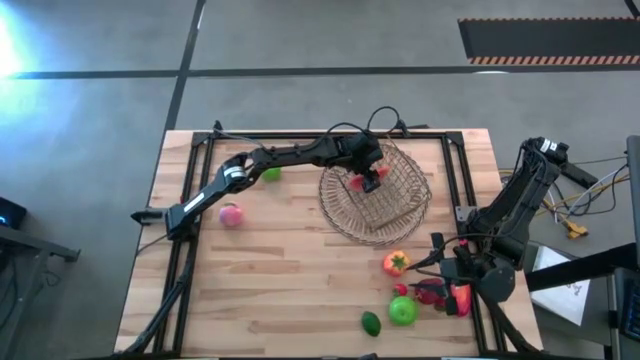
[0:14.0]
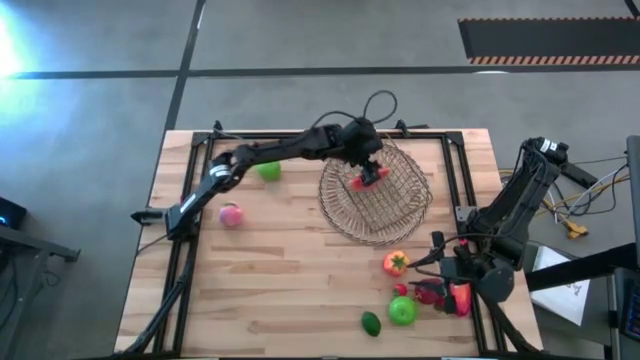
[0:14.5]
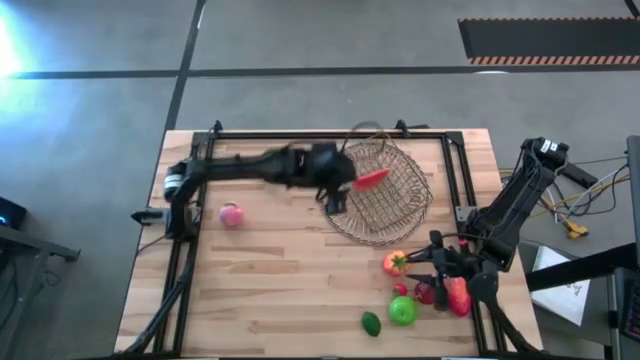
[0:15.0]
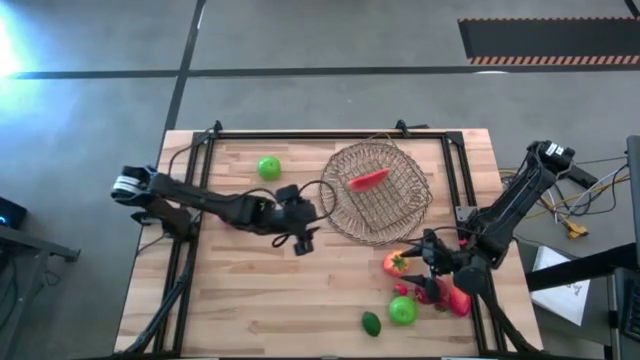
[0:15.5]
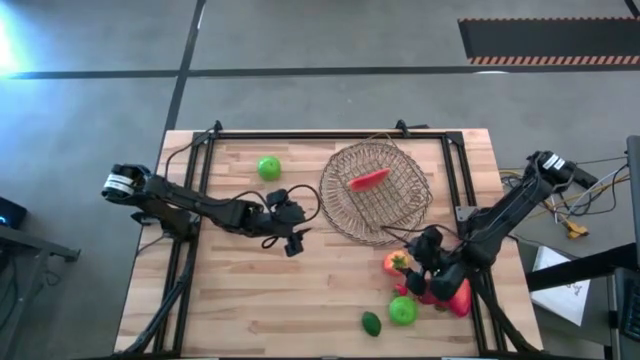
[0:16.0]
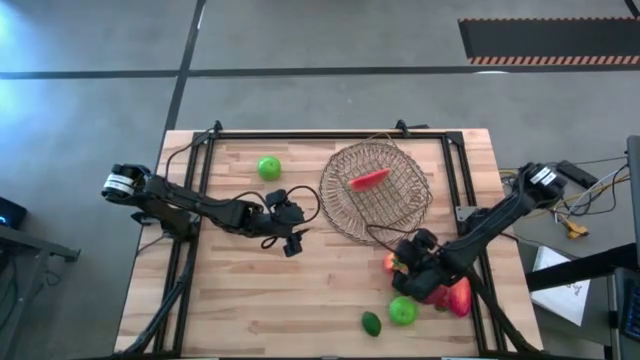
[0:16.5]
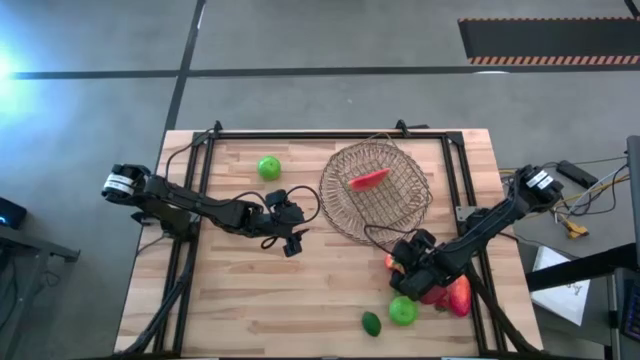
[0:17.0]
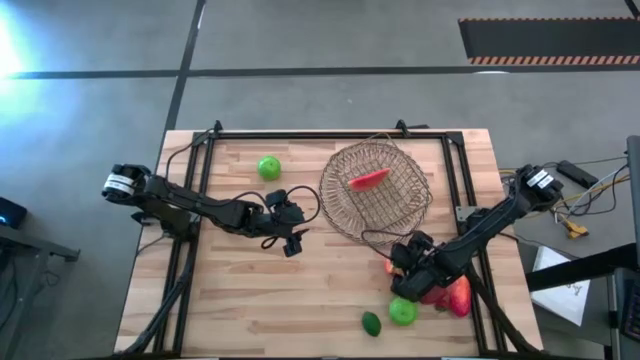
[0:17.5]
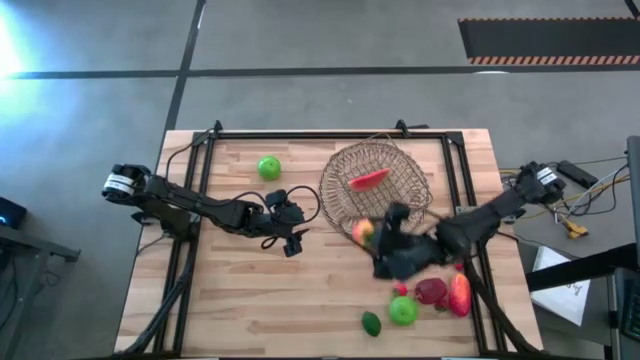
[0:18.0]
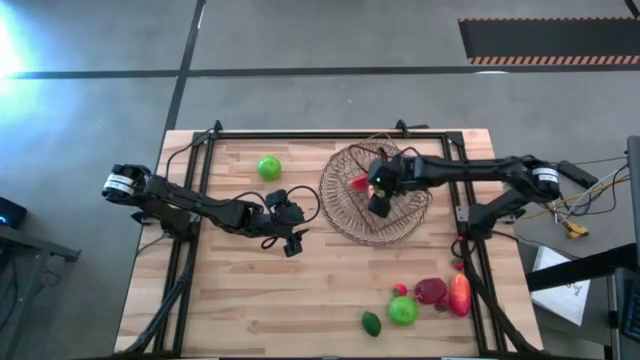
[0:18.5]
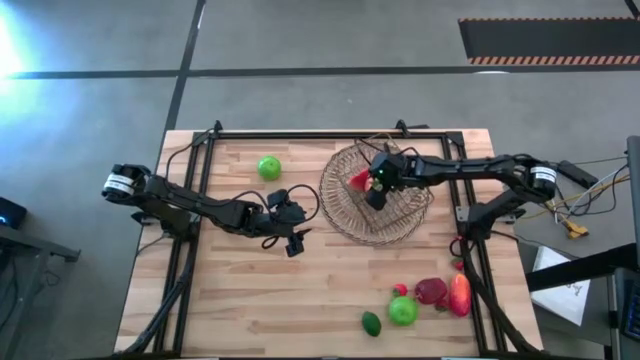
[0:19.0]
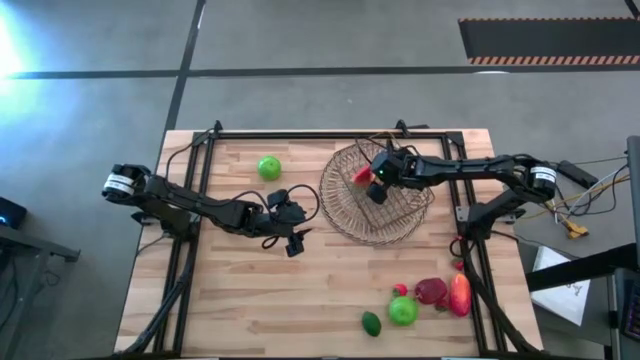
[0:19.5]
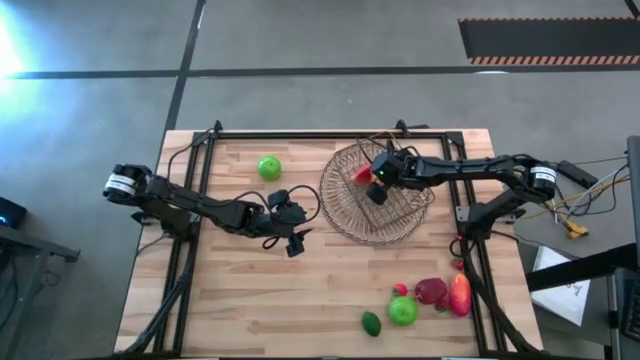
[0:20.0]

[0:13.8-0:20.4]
Task: Build produce basket
Put the orange tomato into the gold mesh basket

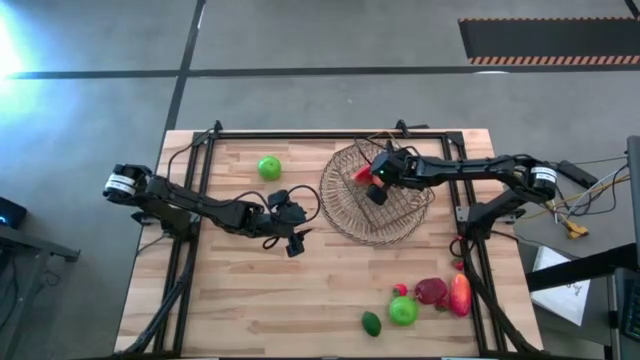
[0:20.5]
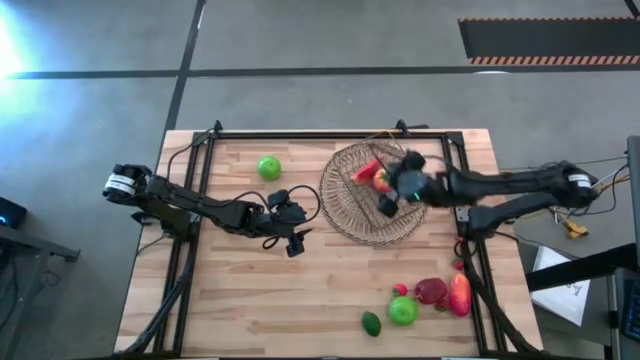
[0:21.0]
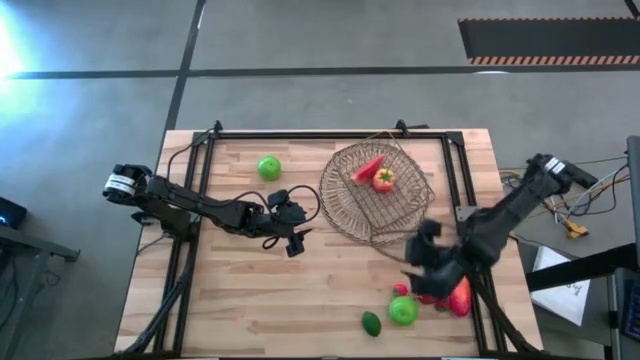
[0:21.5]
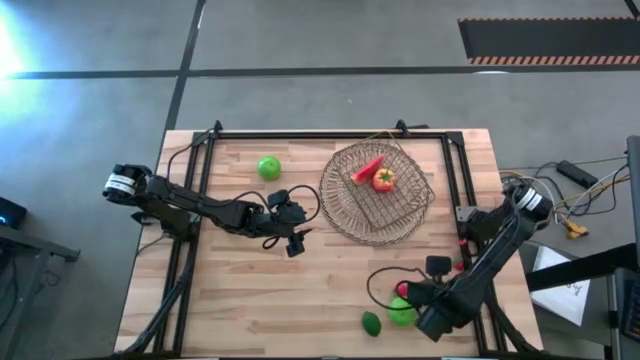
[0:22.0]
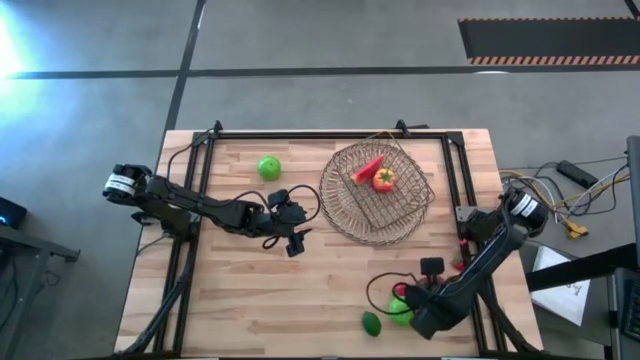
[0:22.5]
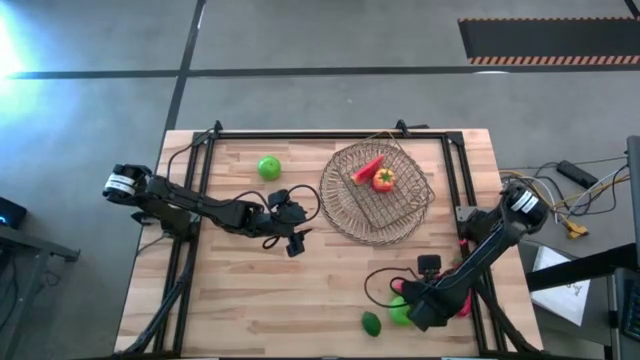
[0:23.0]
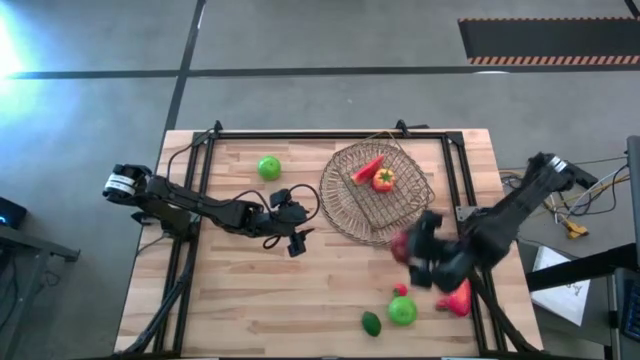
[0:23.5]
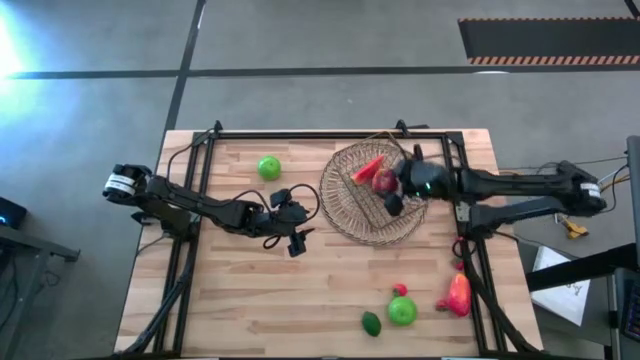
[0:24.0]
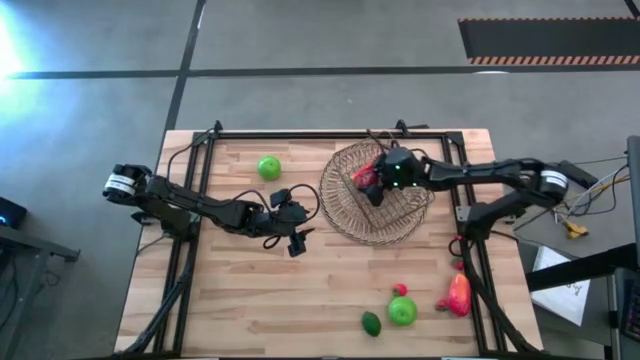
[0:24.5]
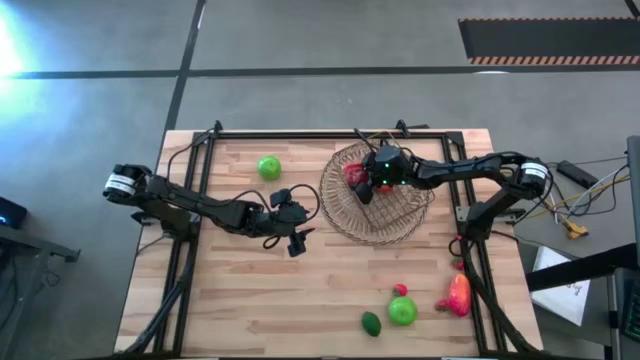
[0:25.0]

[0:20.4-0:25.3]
Put the red apple into the gold mesh basket

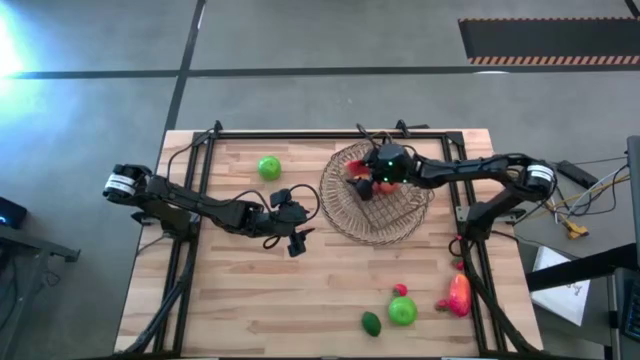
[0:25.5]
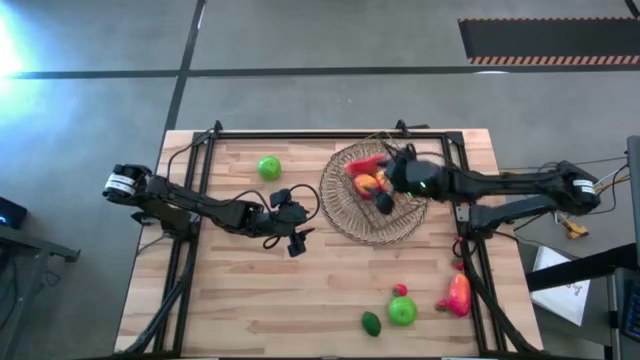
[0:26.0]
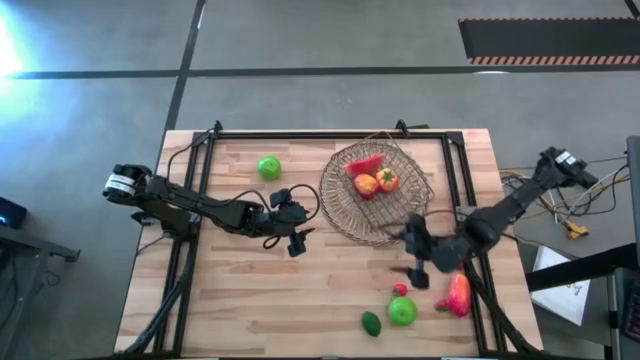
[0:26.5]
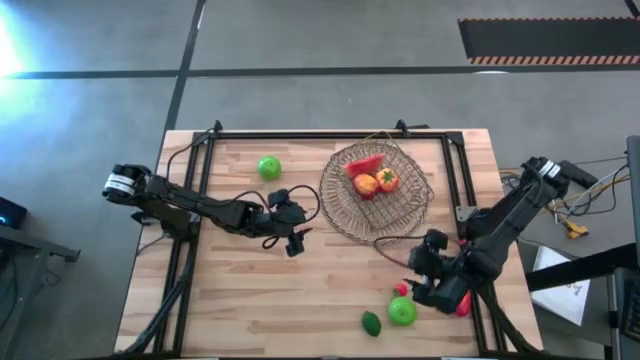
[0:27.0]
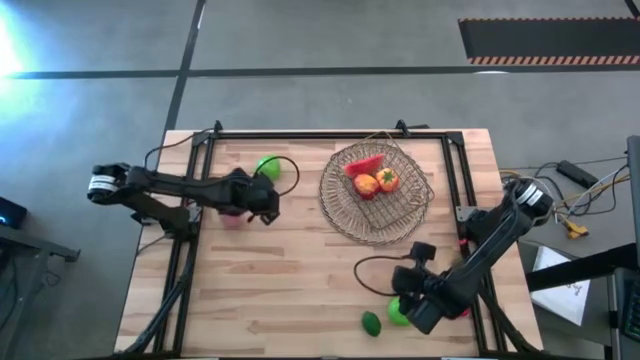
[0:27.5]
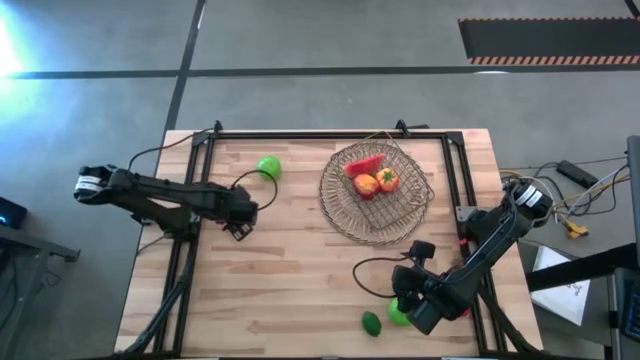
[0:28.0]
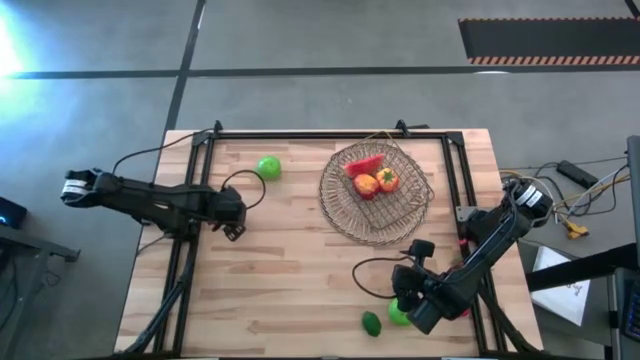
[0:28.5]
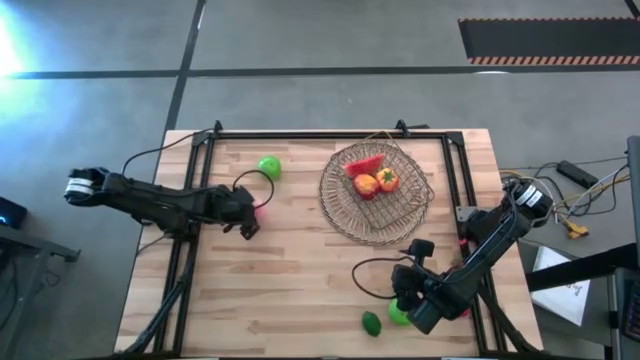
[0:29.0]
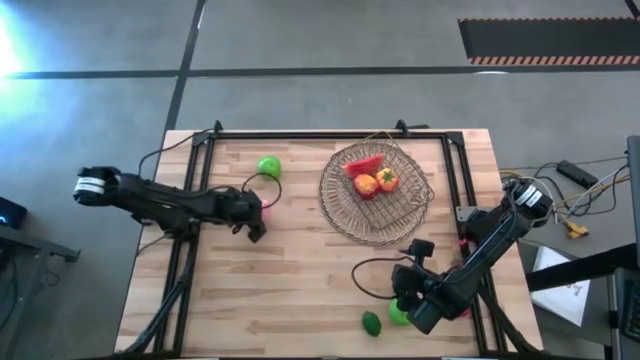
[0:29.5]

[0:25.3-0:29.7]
Put the pink peach into the gold mesh basket

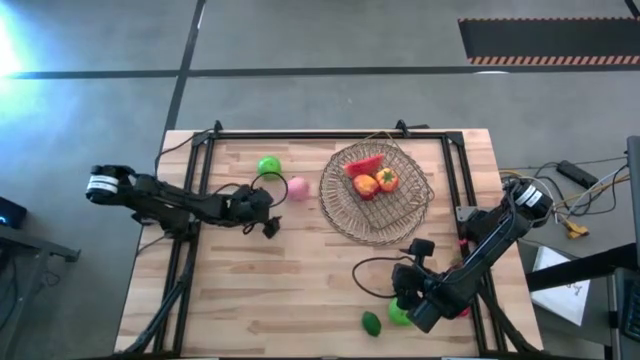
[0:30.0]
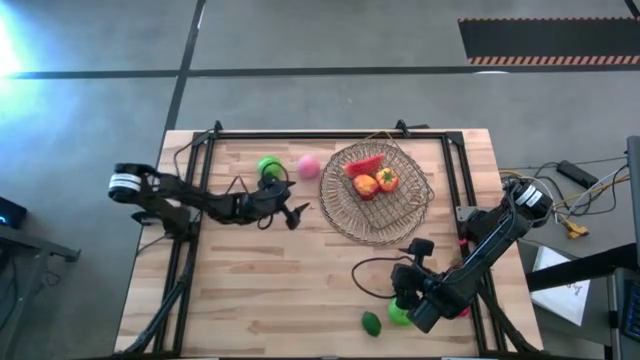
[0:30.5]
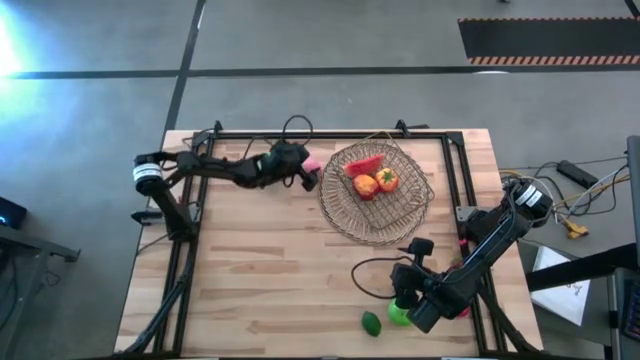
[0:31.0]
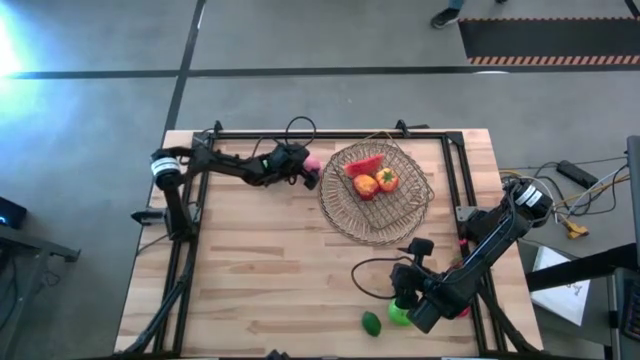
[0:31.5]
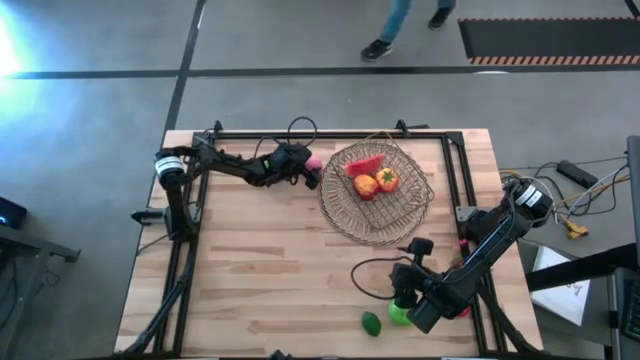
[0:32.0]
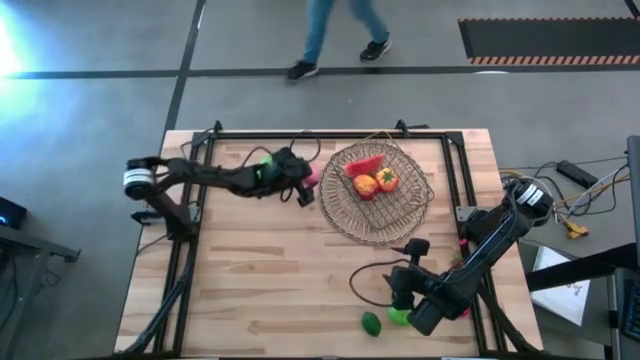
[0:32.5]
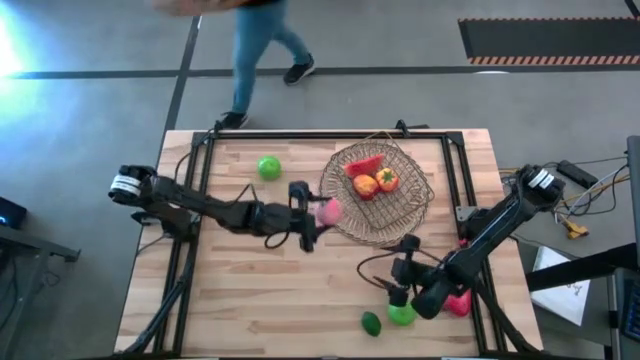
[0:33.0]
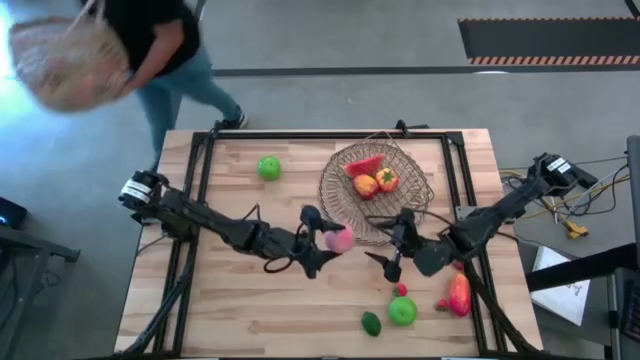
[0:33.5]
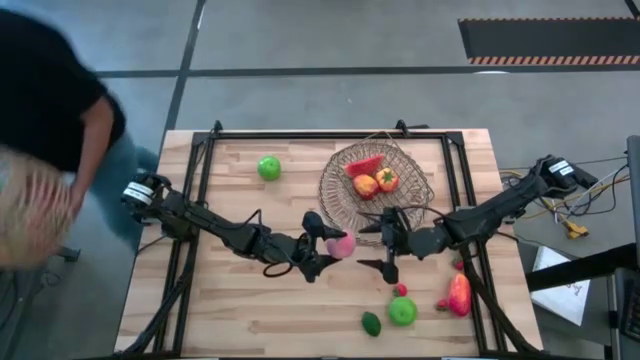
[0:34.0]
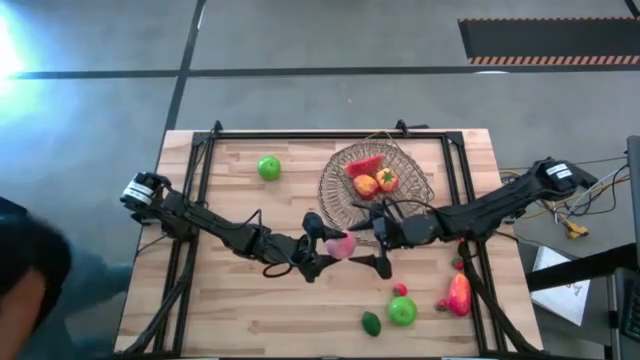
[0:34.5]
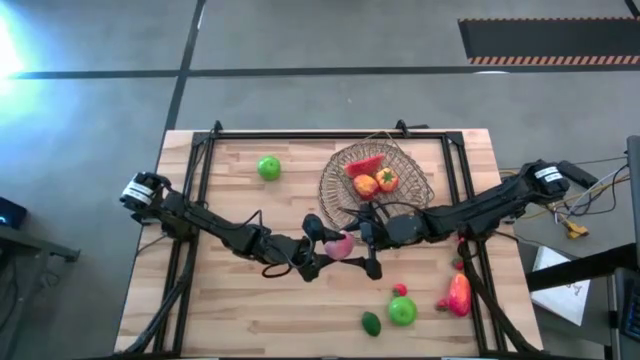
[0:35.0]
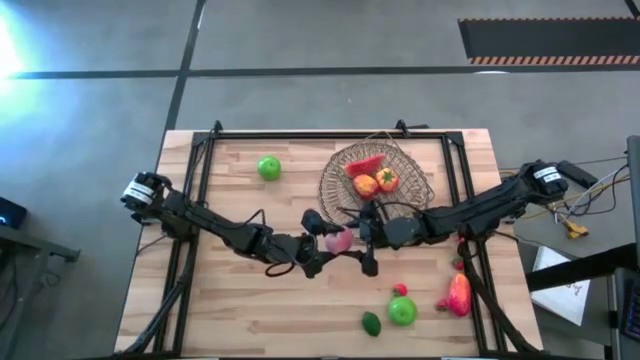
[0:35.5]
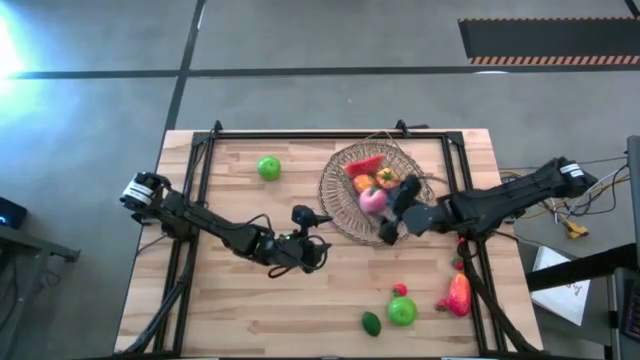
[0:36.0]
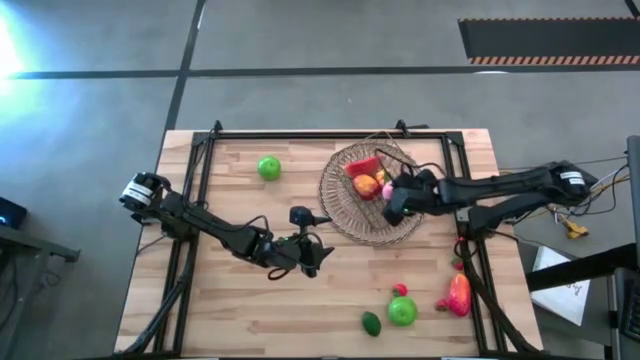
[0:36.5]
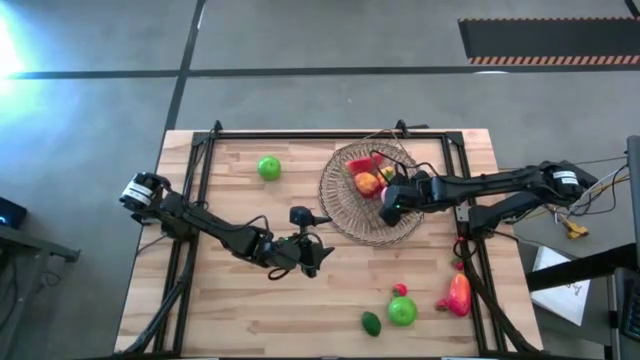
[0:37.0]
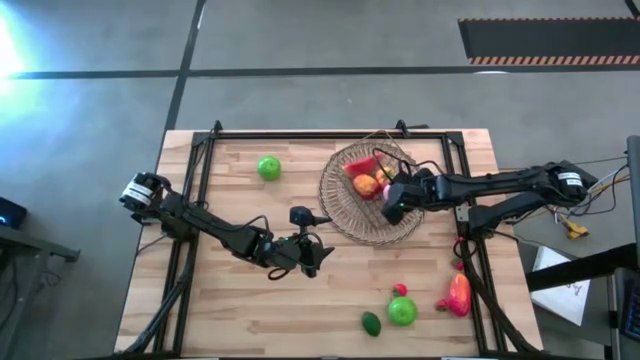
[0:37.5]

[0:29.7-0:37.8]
Put the pink peach into the gold mesh basket
